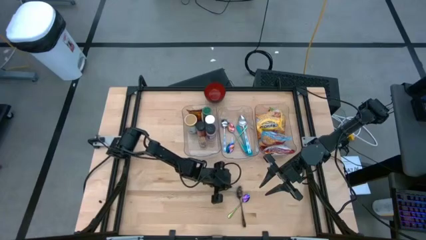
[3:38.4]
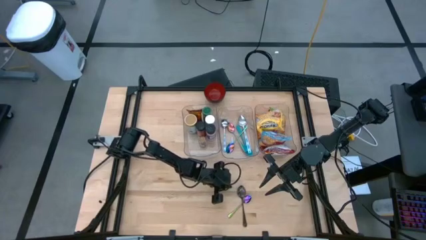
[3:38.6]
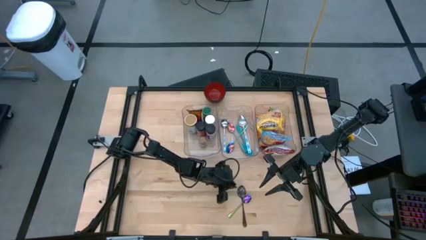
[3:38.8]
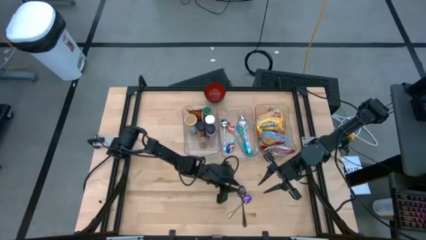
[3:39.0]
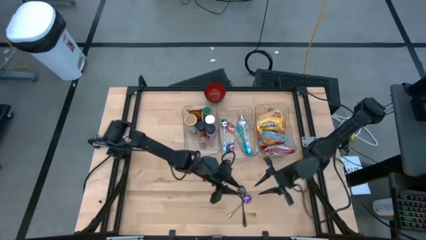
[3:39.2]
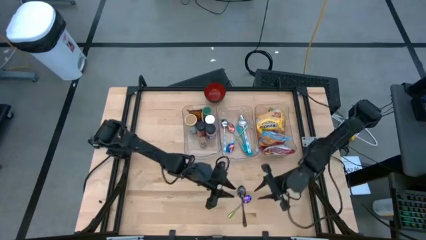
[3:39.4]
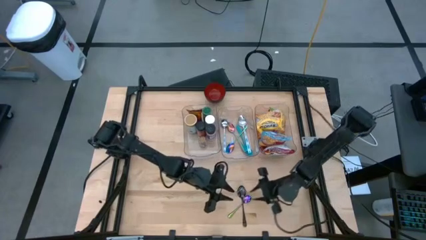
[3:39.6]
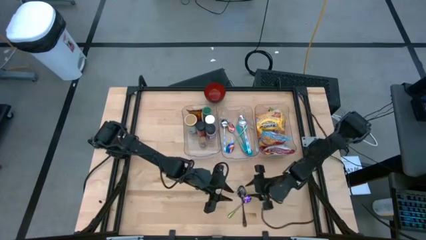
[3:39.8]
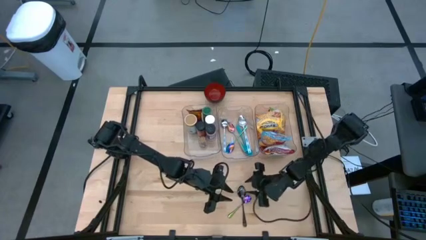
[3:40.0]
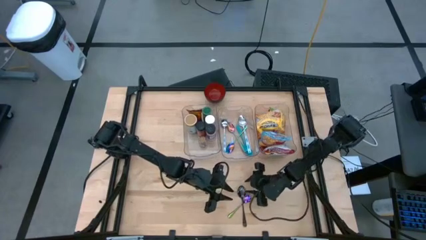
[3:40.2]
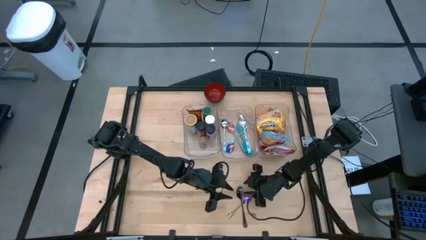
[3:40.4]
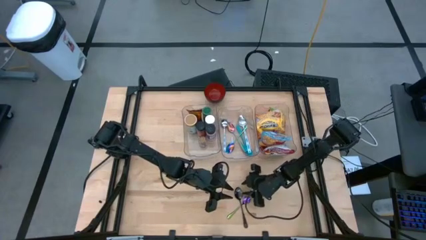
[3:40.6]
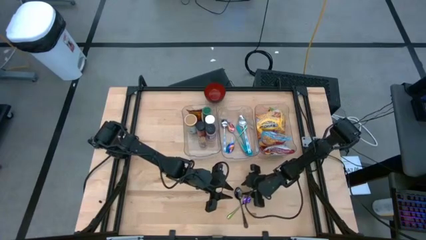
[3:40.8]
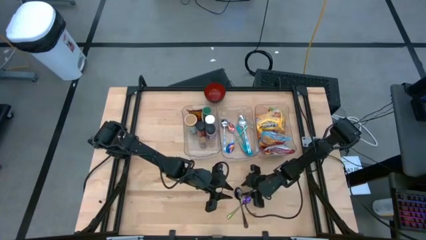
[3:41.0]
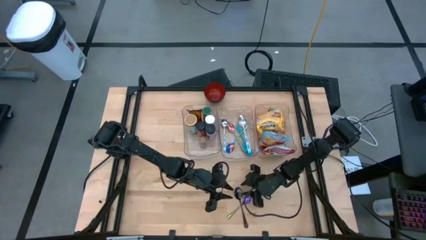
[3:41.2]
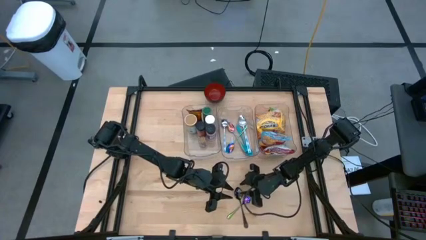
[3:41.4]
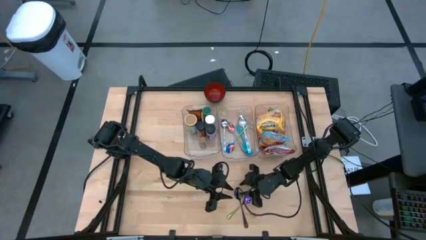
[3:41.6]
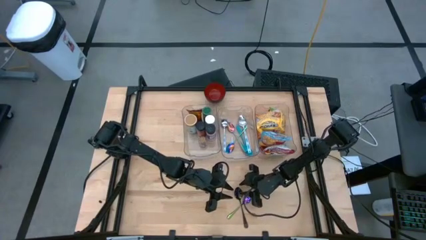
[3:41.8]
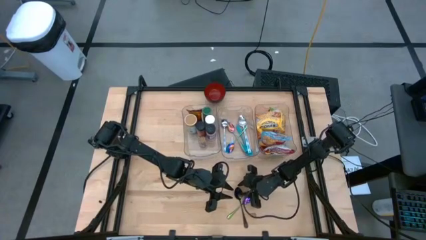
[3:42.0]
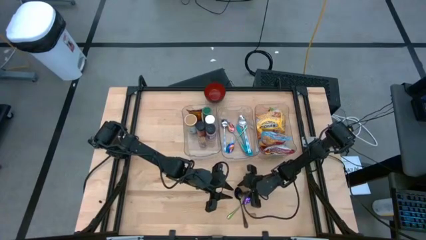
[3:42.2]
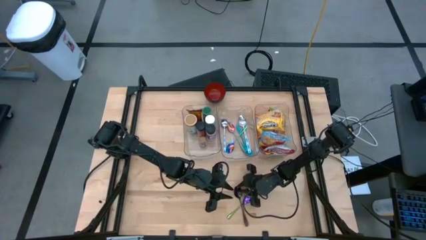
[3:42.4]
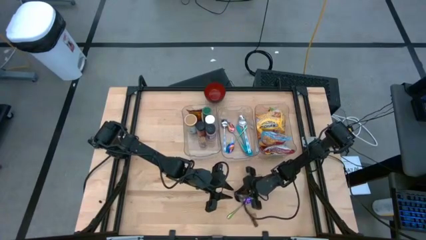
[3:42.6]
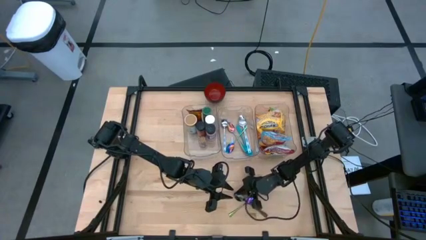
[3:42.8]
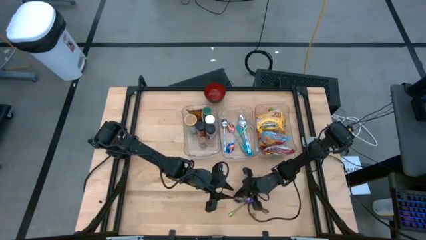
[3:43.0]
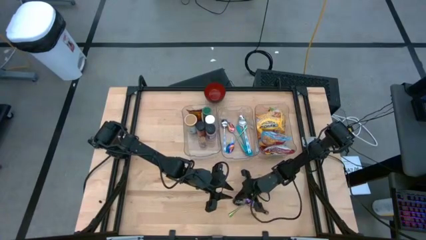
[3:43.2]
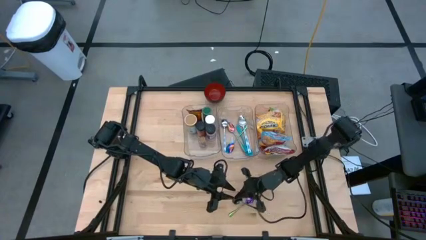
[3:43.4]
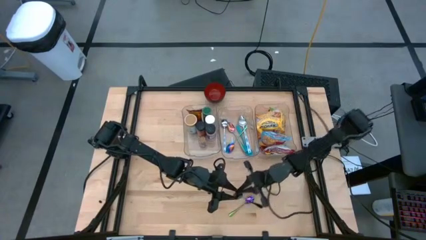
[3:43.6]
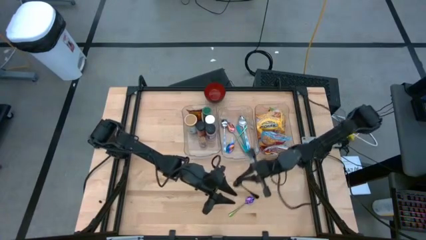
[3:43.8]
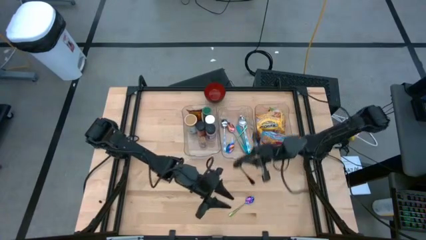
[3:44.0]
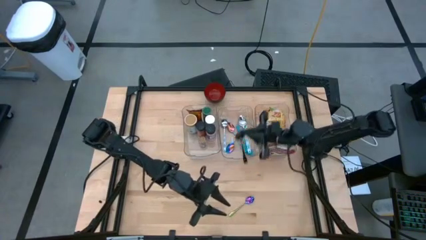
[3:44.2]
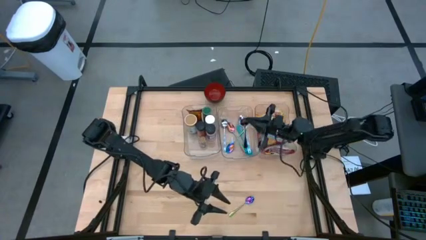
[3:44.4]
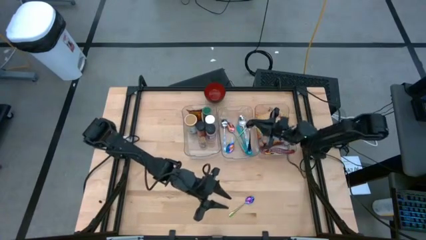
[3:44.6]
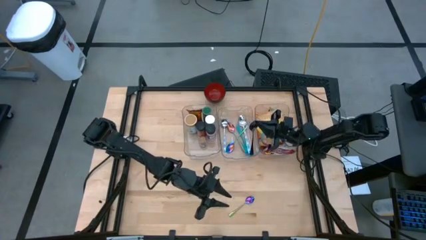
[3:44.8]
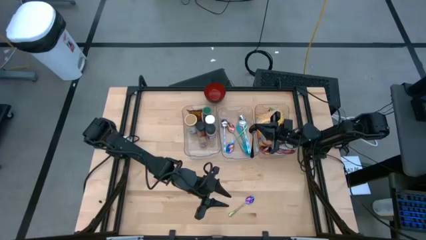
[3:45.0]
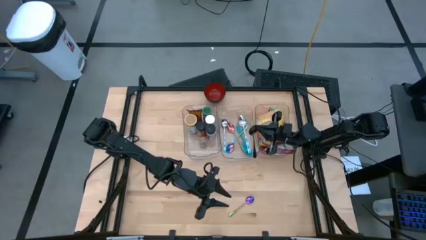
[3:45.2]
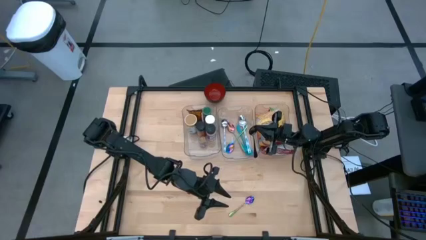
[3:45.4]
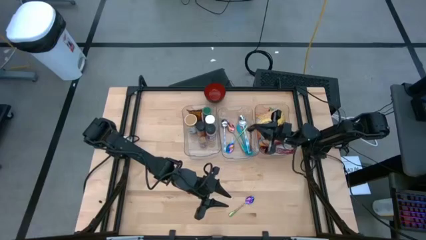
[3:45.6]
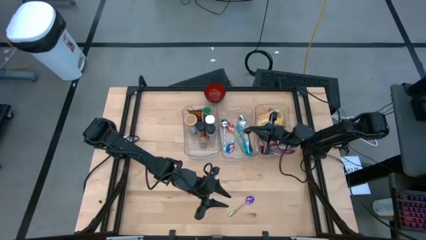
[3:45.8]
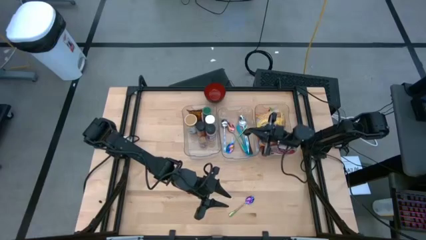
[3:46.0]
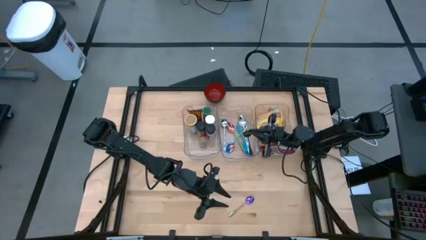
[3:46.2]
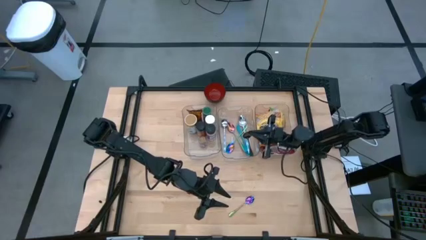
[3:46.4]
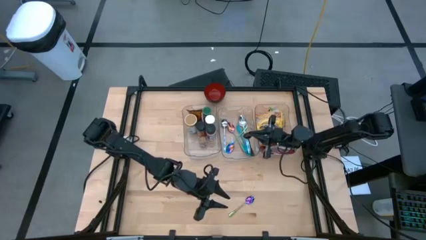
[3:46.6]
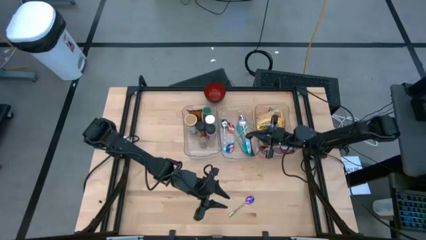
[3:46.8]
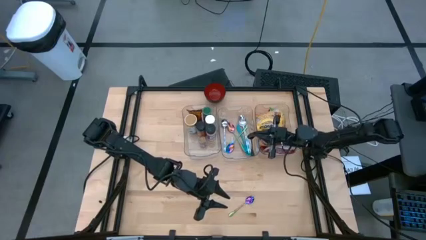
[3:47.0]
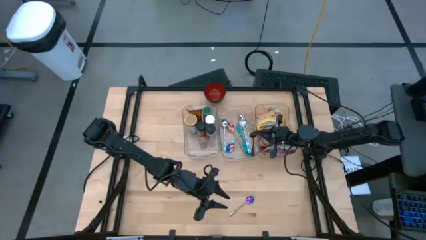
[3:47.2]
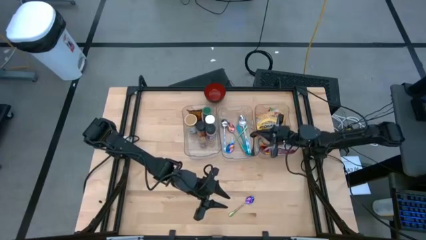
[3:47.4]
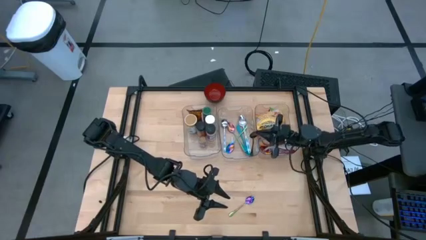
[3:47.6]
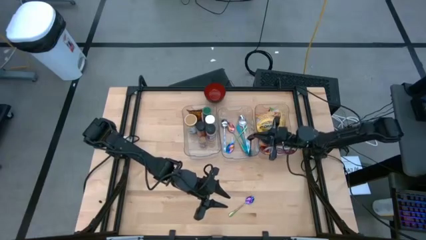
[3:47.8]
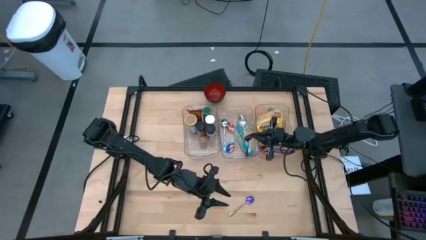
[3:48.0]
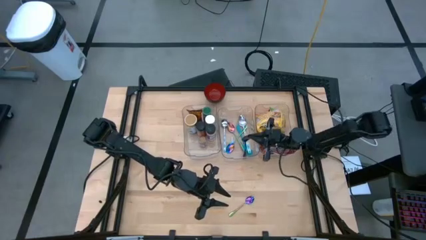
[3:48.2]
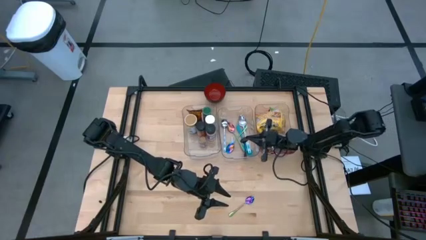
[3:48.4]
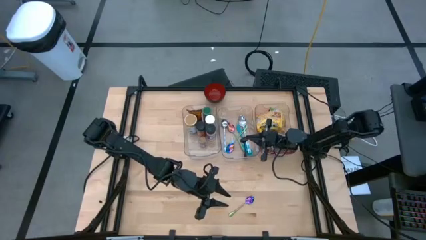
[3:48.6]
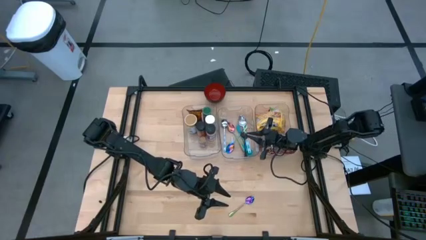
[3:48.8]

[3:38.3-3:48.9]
Task: Pick & Place Food Item
Put the black spoon into the middle transparent bin

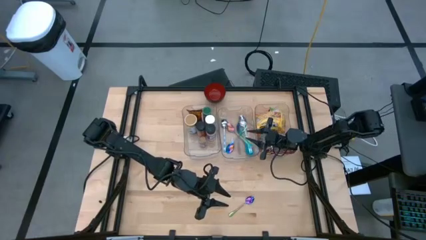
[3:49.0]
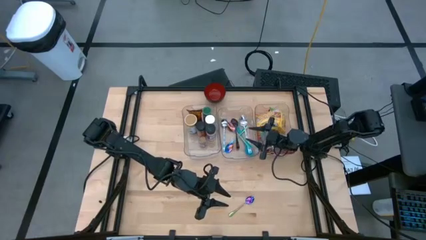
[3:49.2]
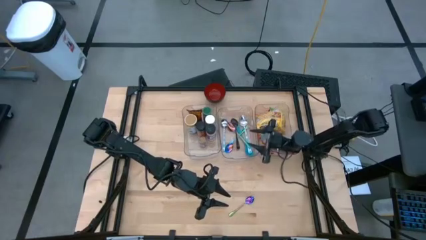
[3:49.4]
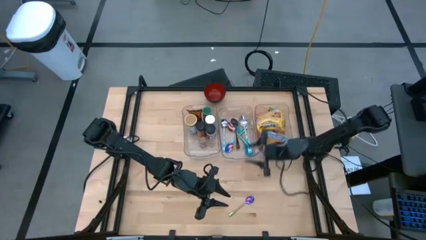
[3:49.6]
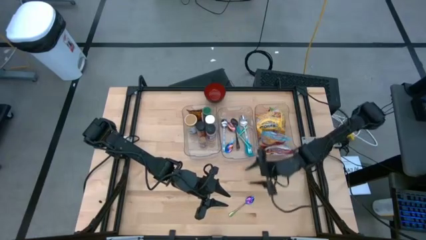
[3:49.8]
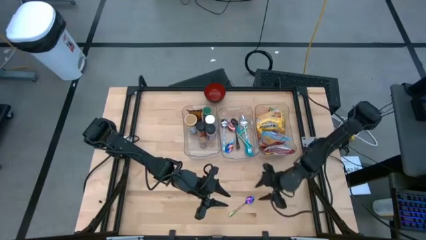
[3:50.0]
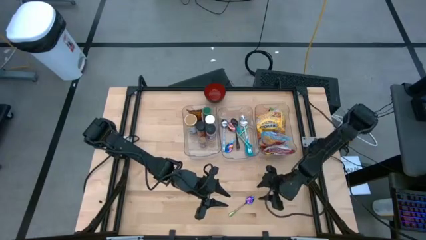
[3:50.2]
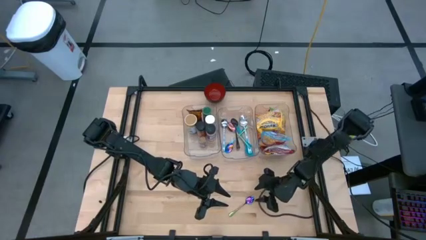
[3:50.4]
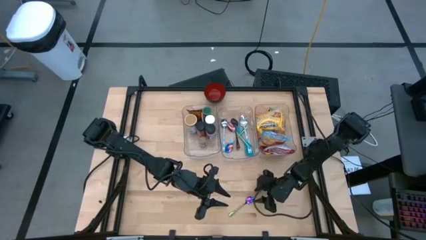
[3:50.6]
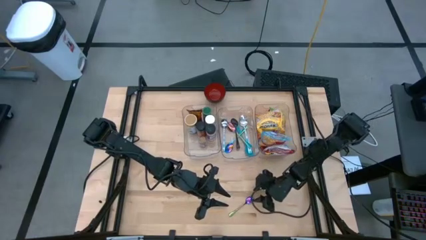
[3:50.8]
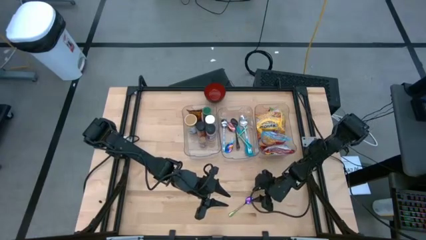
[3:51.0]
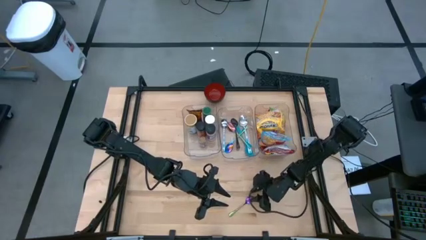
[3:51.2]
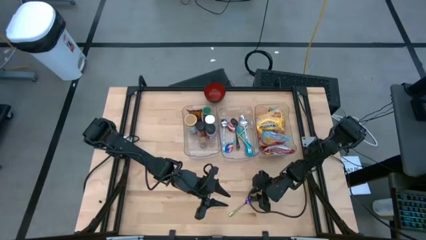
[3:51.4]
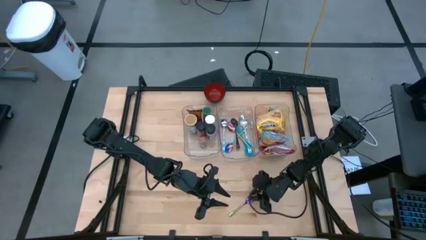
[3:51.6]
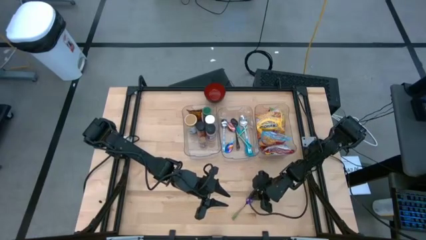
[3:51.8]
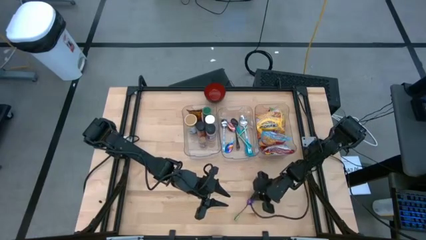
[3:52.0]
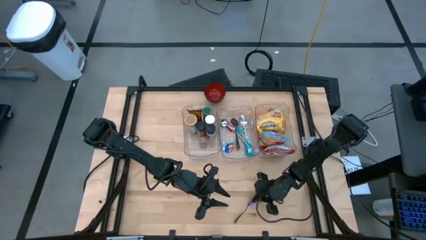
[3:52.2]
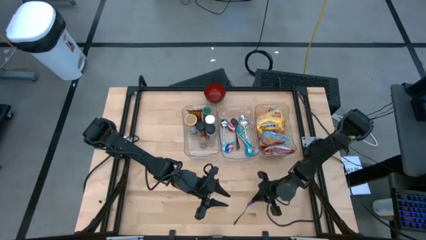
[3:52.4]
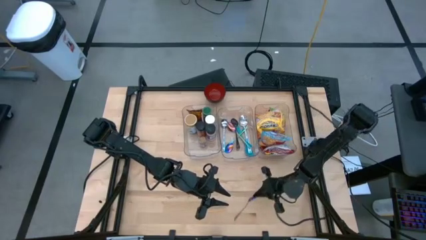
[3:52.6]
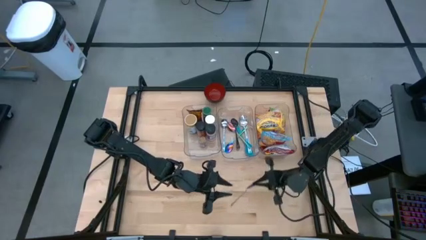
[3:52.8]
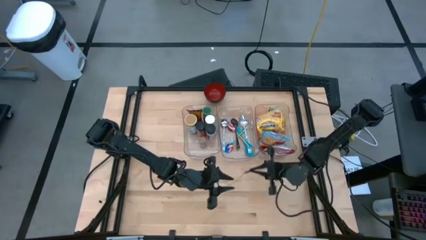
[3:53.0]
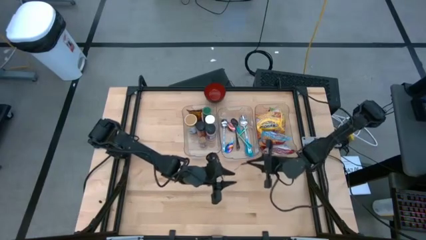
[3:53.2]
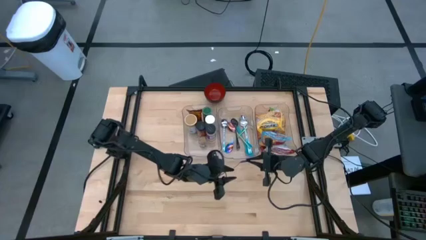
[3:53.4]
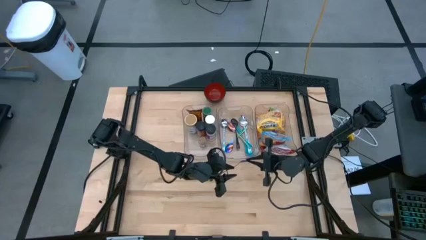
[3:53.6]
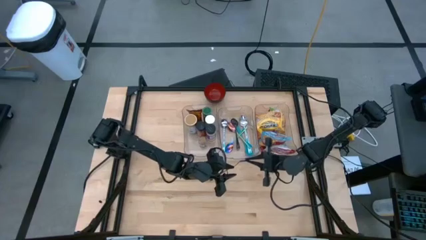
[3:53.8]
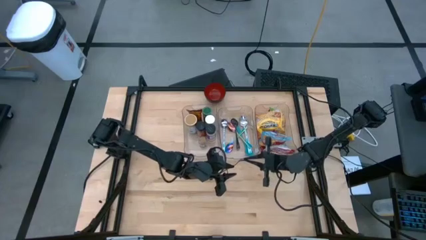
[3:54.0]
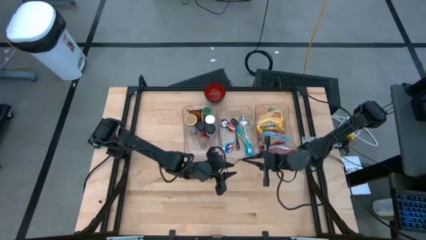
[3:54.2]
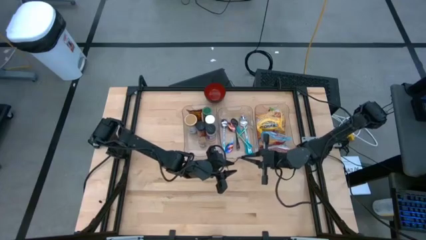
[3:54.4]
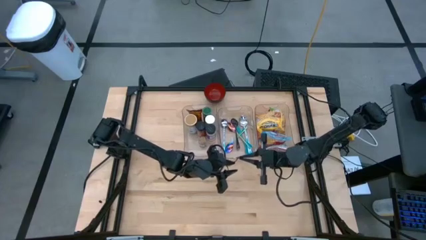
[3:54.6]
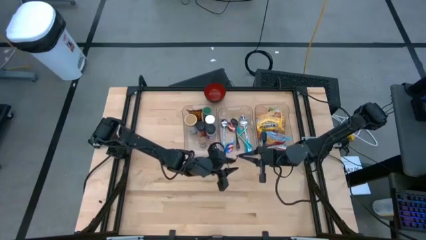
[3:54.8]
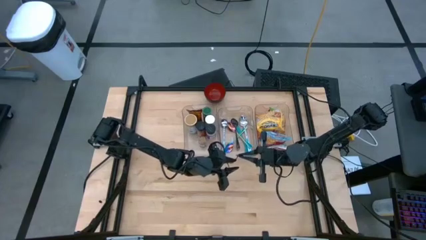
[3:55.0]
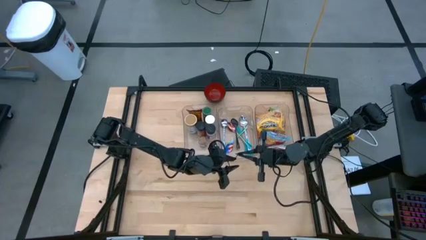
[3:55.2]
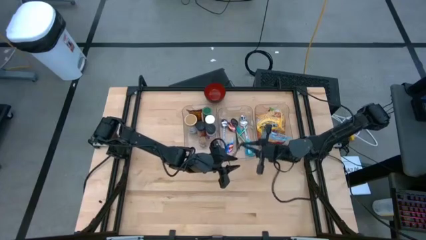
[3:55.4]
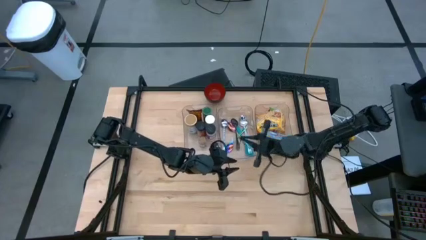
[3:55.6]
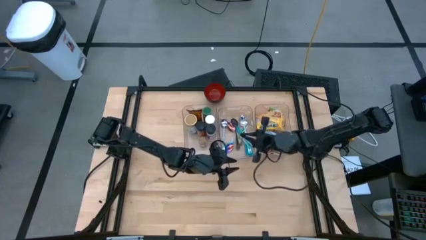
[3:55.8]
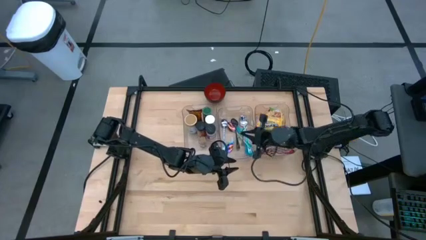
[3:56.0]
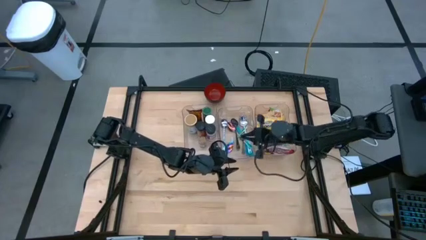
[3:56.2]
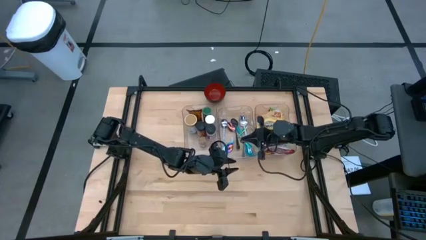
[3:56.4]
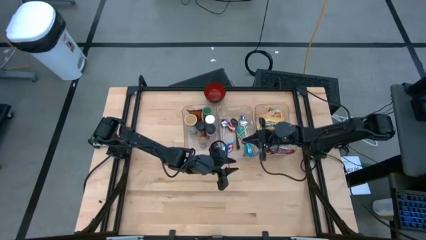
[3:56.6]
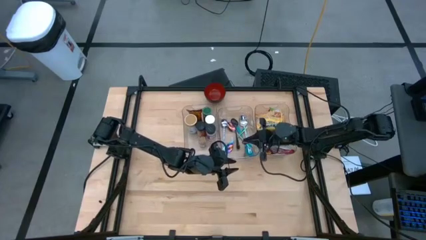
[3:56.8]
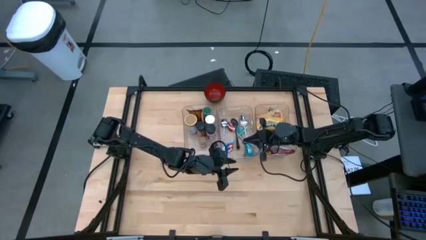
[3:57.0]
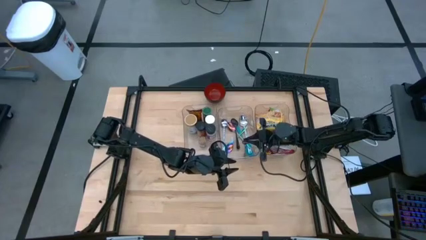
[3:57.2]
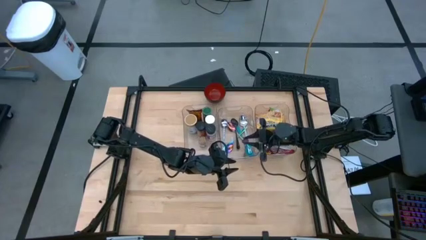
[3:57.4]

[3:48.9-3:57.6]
Put the purple spoon into the middle transparent bin
